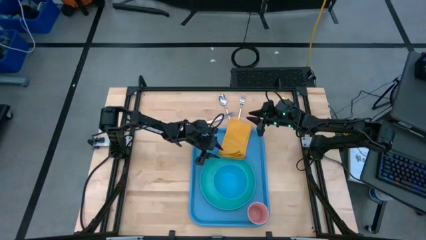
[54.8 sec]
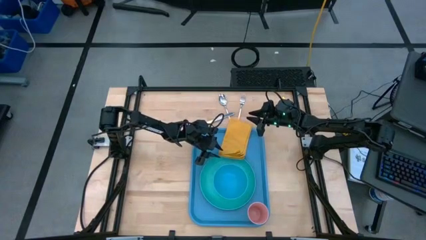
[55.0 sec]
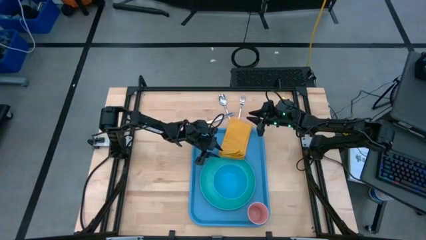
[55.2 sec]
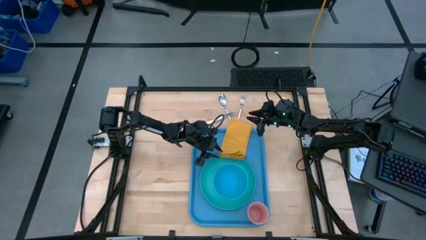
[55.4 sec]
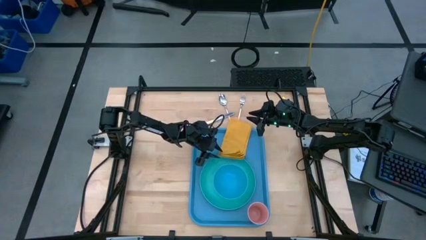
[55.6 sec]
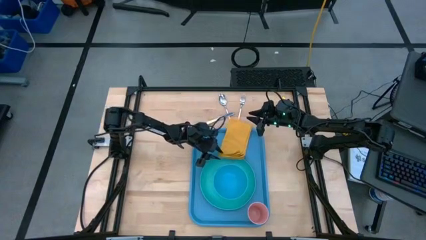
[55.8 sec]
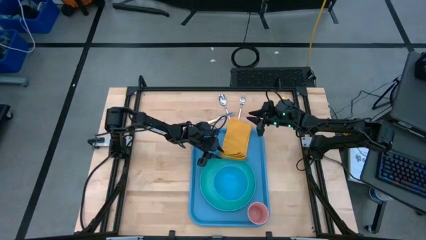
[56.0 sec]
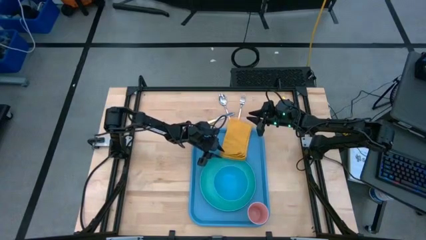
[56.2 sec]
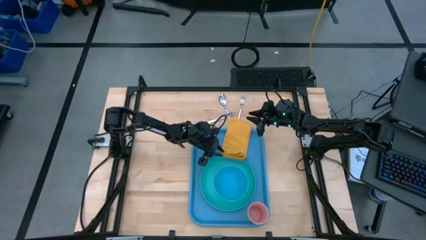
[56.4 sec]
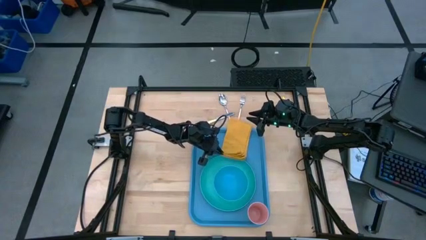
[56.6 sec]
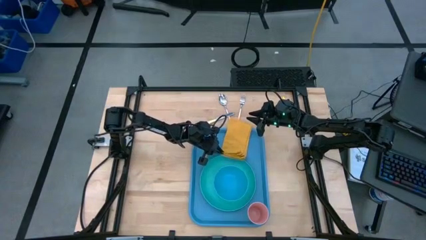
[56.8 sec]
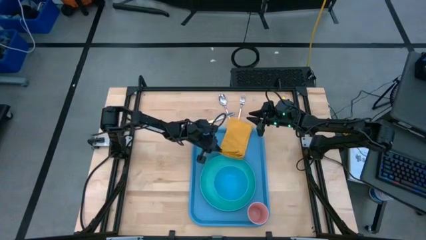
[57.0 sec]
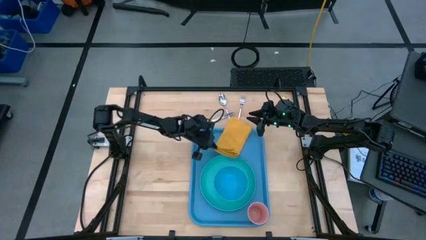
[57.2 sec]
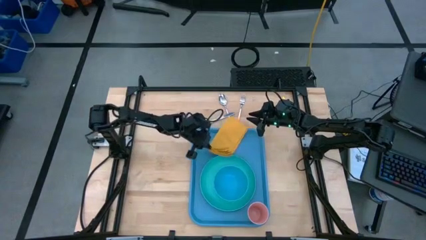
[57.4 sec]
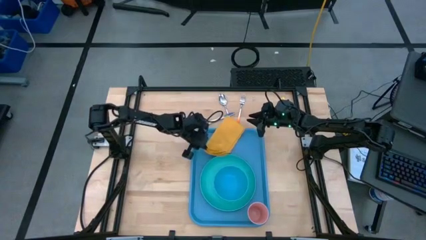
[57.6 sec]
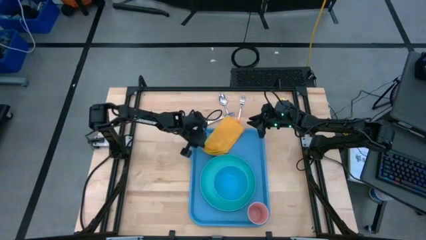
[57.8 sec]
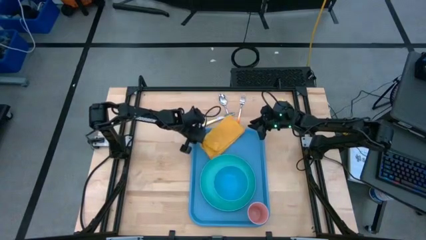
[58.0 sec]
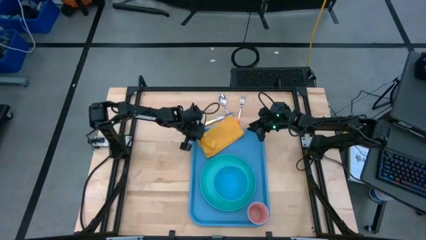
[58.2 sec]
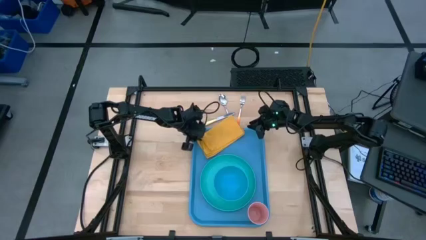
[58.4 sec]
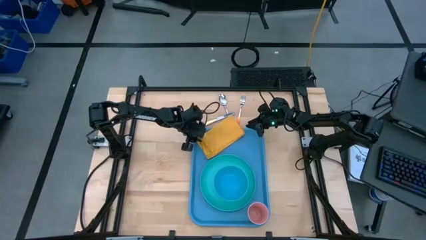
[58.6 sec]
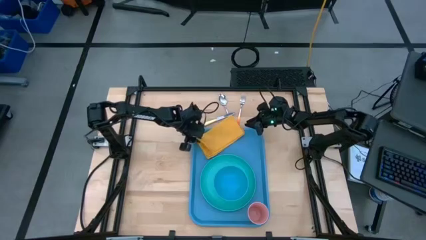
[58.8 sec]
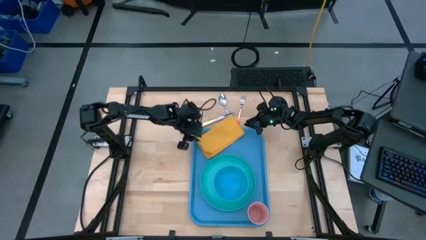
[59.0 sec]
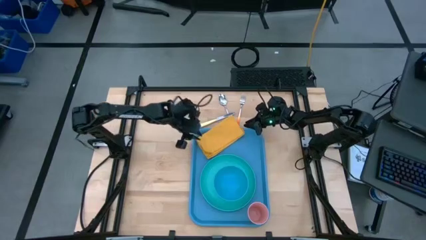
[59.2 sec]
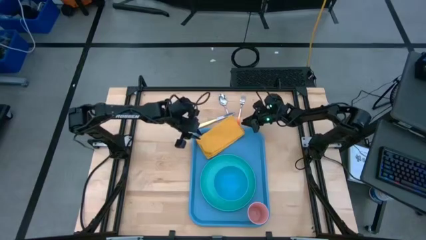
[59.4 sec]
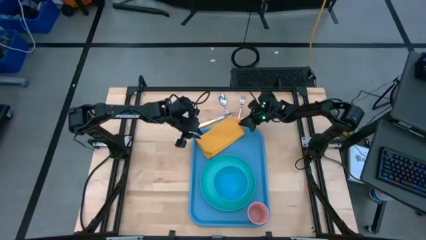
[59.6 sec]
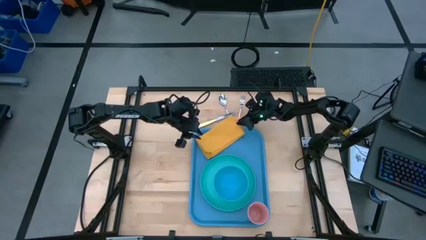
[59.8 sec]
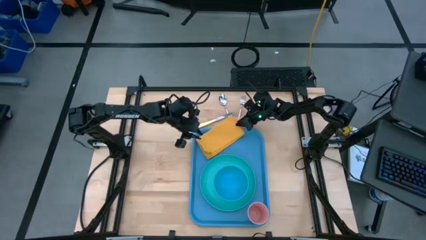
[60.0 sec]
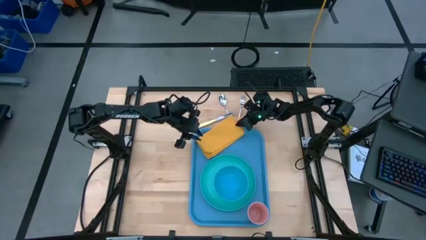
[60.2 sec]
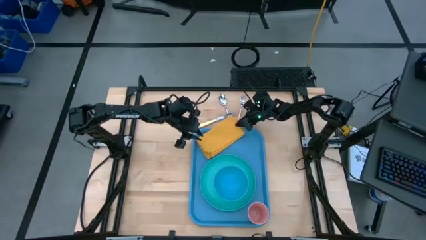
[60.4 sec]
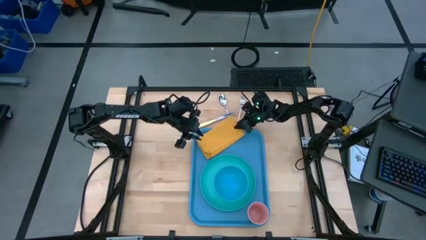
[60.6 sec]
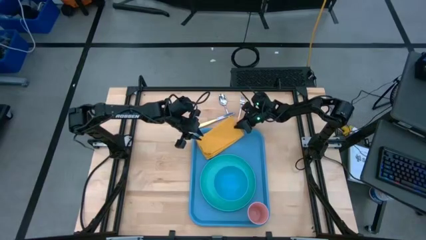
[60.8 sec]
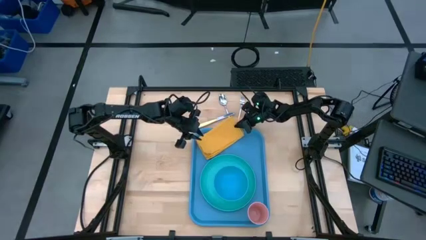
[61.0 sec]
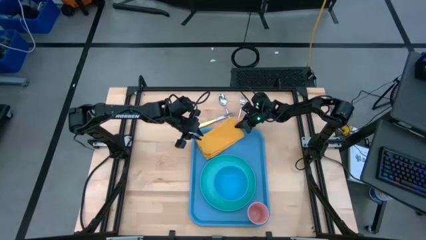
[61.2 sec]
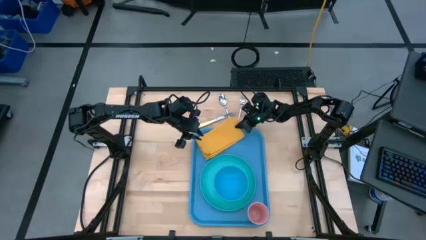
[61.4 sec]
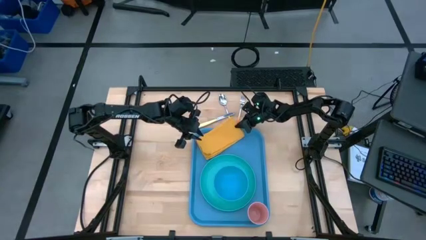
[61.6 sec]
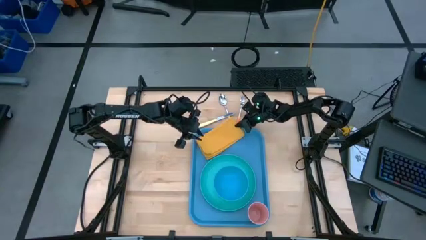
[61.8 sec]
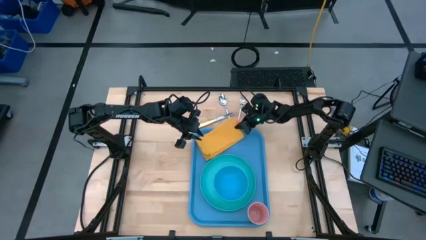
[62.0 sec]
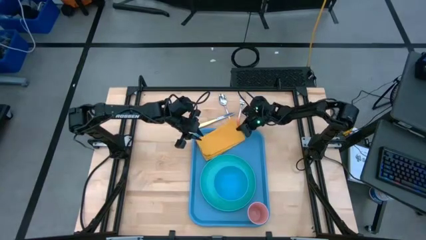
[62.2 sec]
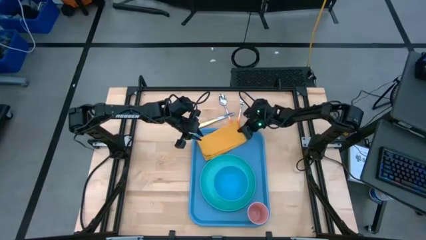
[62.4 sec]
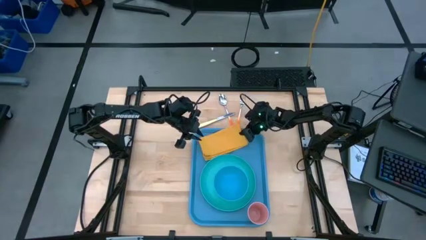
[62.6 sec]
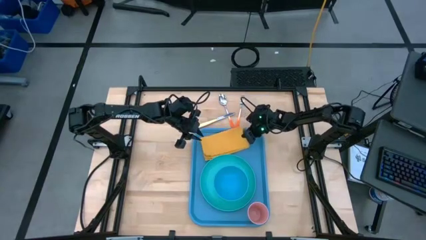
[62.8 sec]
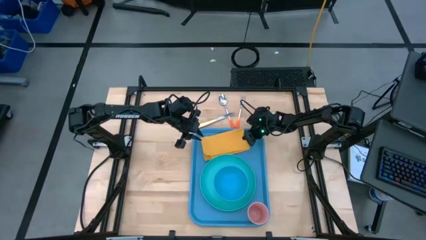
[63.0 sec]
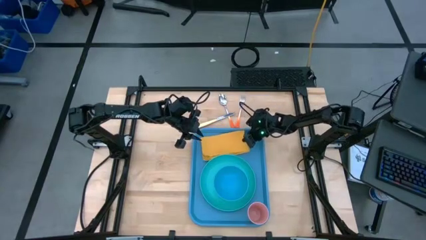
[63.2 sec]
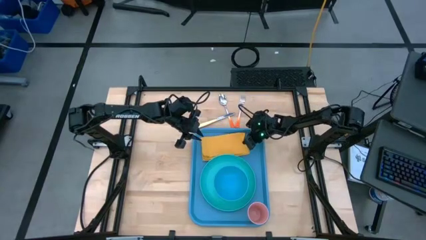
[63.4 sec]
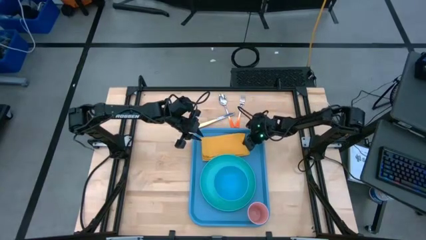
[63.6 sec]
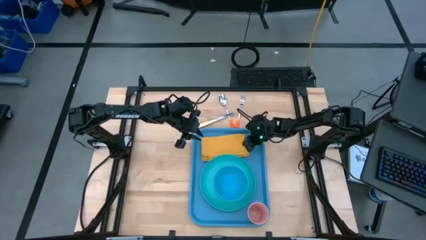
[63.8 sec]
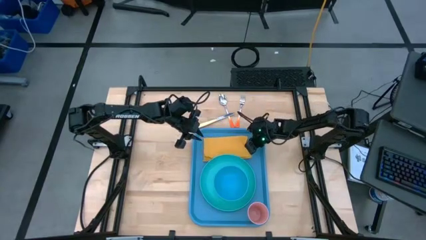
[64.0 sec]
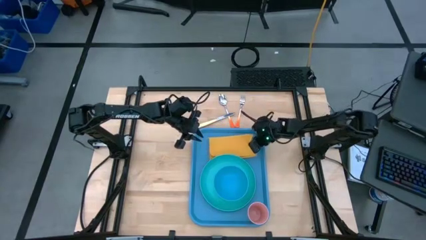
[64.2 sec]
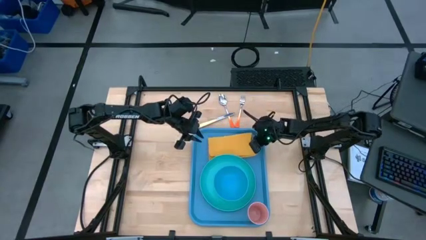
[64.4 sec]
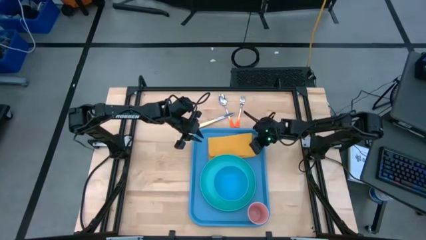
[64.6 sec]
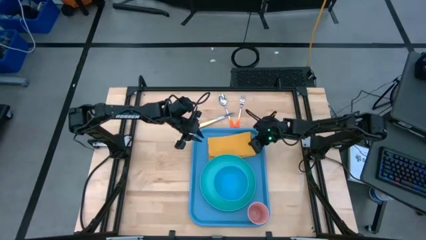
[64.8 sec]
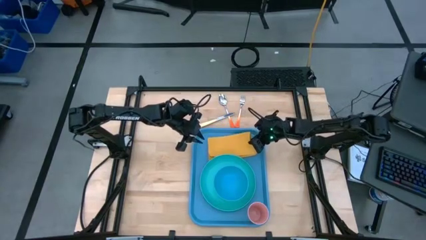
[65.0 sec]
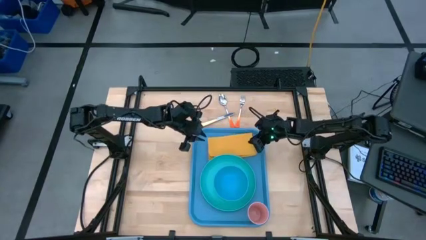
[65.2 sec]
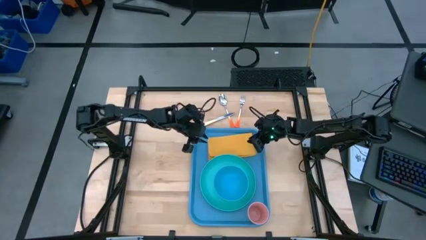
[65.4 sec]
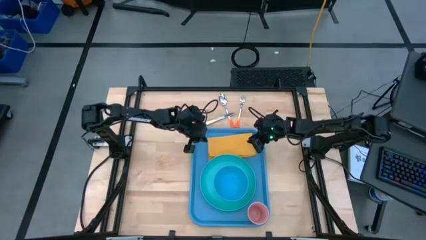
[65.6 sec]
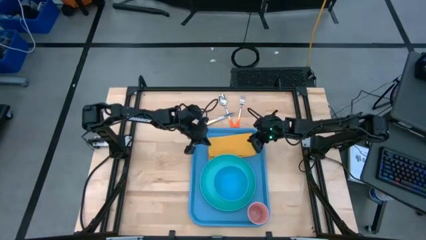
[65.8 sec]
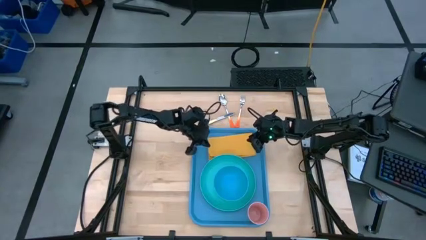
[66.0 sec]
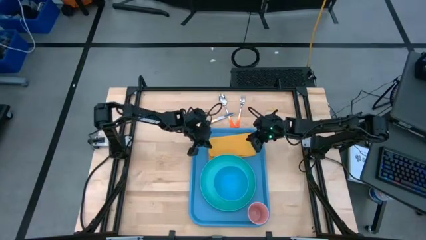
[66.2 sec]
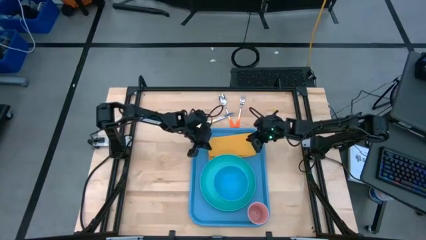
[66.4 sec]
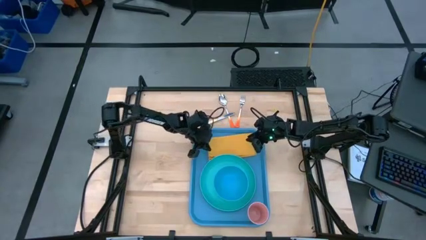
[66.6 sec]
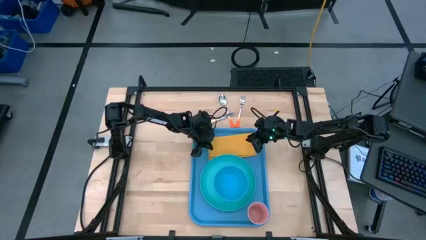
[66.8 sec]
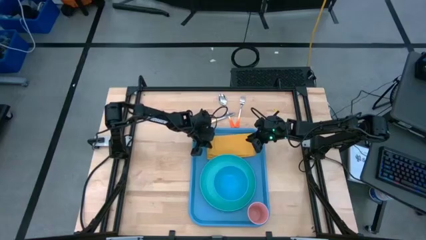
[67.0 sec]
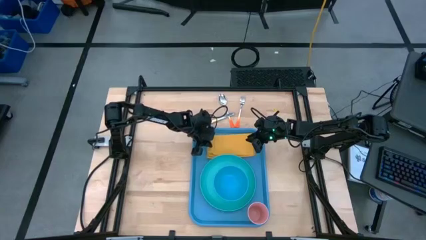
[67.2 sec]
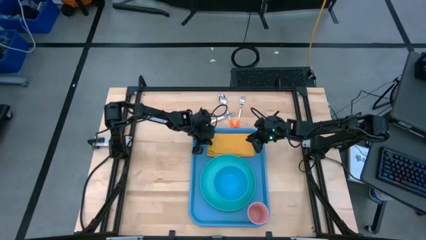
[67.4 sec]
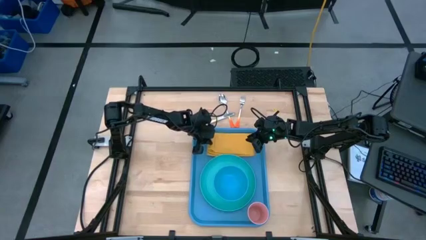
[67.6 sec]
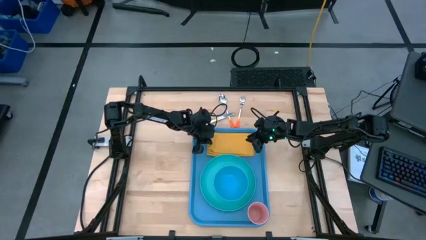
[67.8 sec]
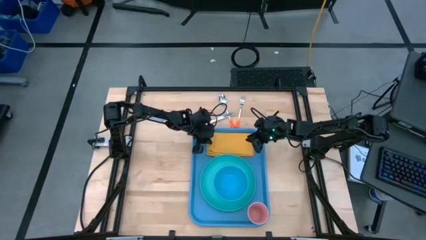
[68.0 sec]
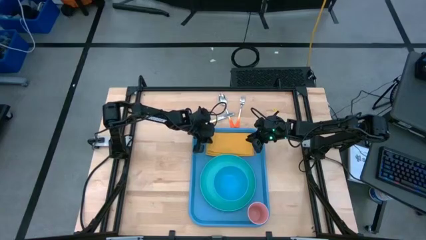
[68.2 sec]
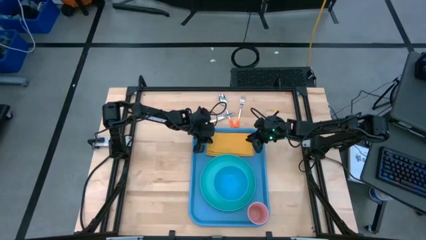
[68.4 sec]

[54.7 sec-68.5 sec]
Task: Set up tray
Put the yellow napkin top the left of the light blue plate on the blue serving tray

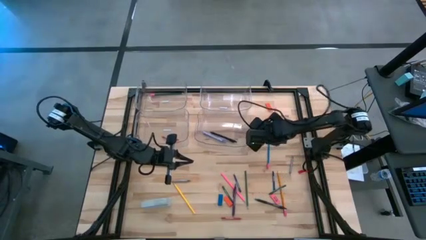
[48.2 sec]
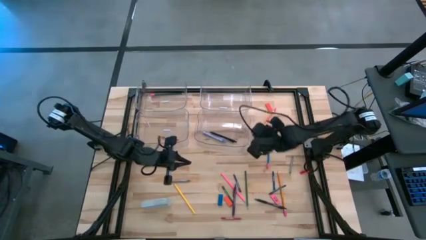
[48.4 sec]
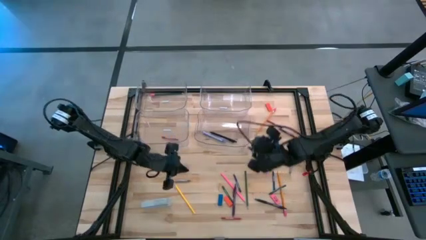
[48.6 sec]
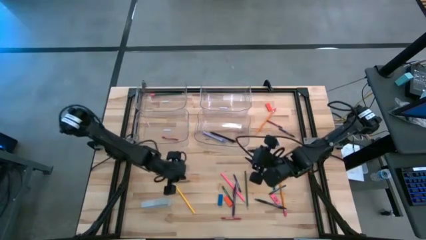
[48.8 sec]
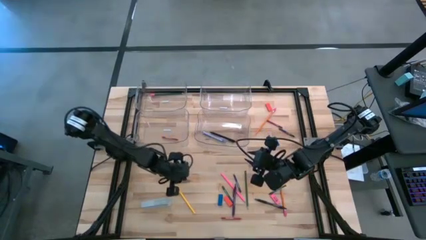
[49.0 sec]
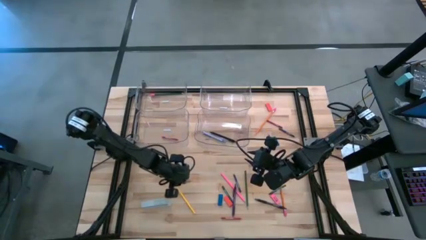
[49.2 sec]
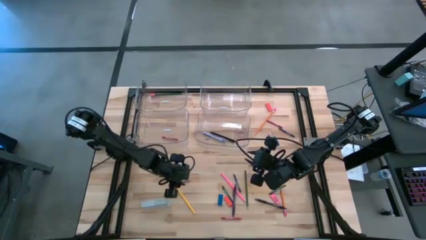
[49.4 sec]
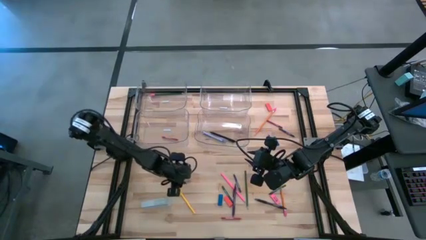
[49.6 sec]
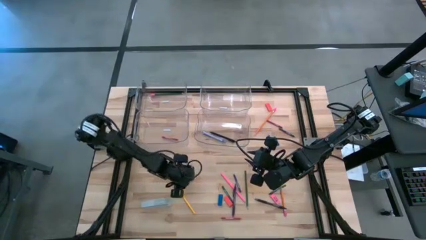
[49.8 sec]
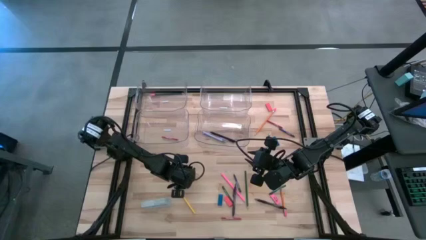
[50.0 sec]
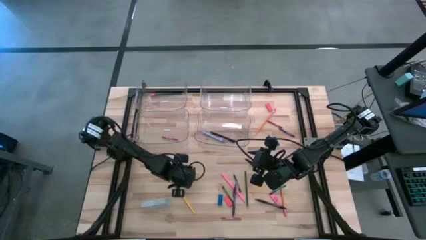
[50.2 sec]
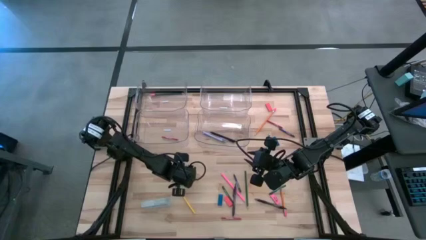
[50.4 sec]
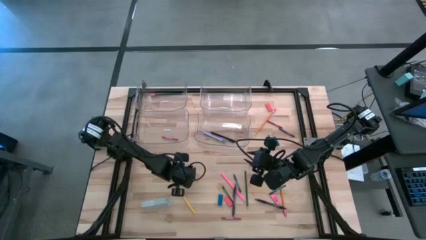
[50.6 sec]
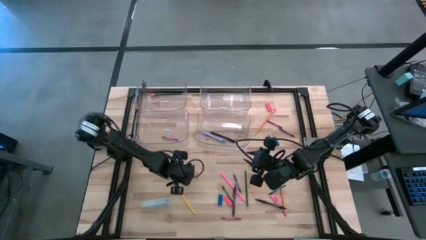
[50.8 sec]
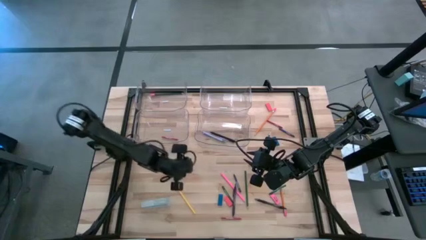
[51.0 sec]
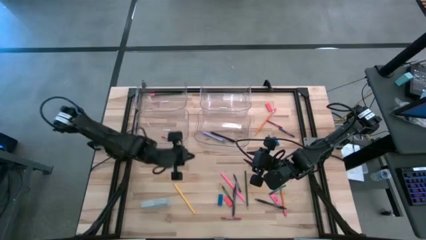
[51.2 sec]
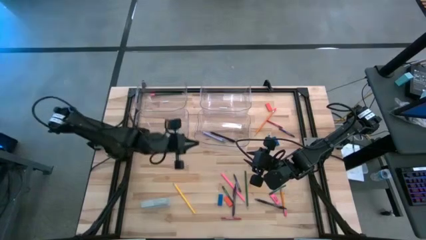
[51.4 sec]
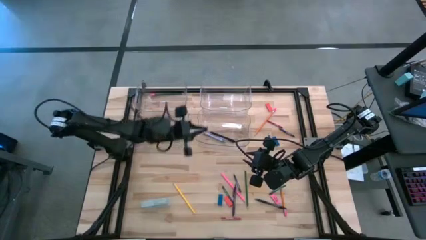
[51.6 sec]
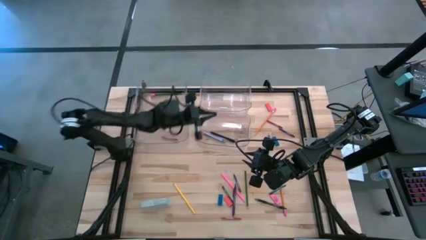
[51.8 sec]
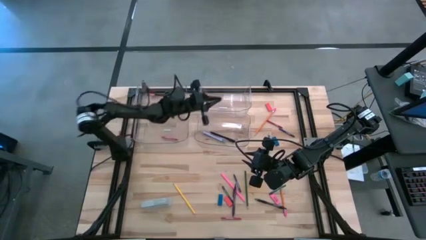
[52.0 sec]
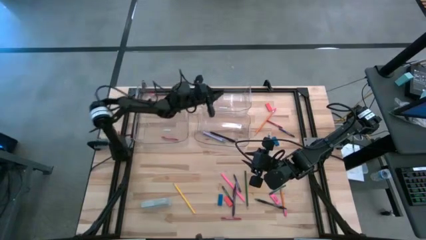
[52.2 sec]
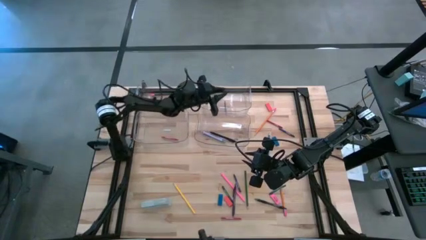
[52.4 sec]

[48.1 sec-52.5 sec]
Task: Sort crayons/erasers/pens/pencils in bins
Put the left gray crayon into the top right transparent bin
